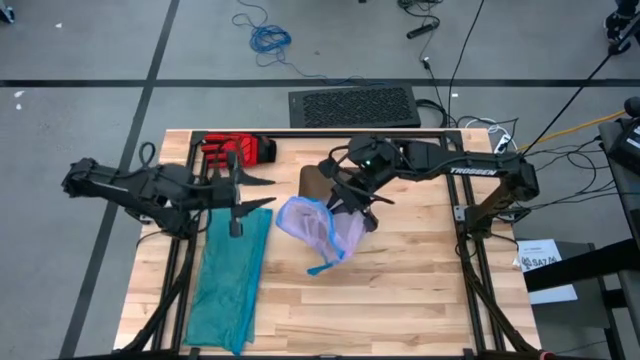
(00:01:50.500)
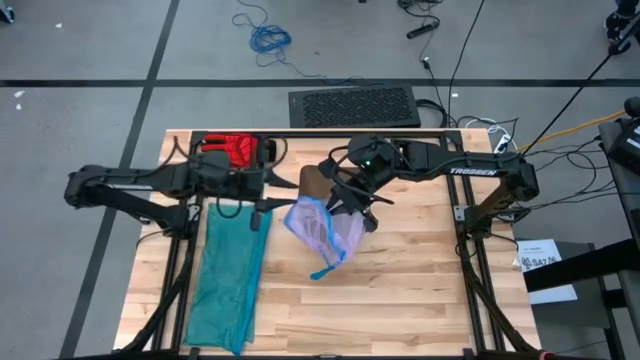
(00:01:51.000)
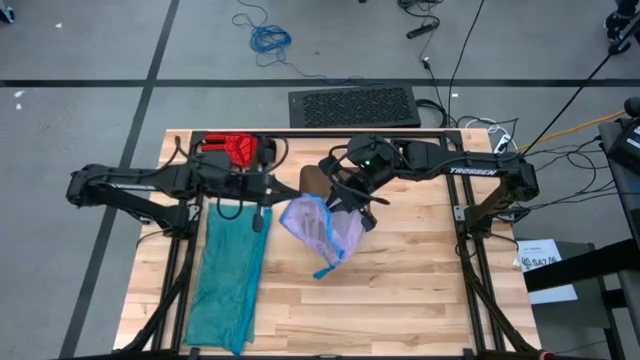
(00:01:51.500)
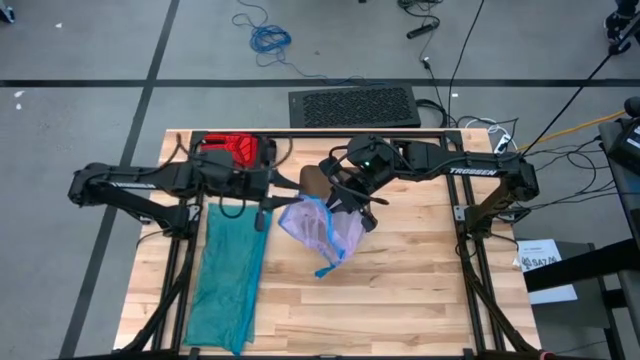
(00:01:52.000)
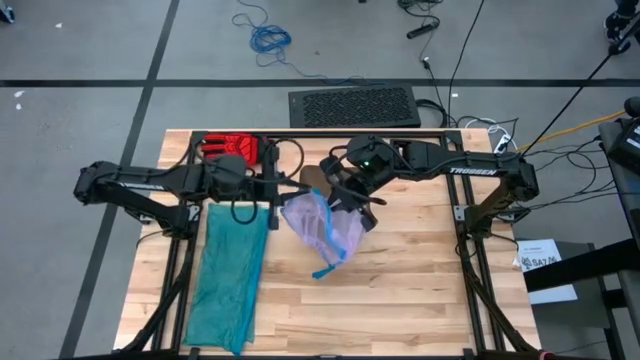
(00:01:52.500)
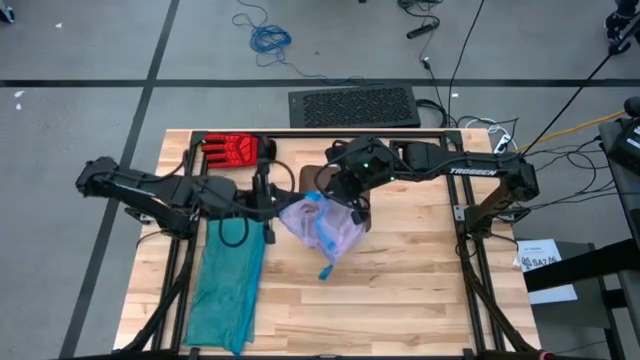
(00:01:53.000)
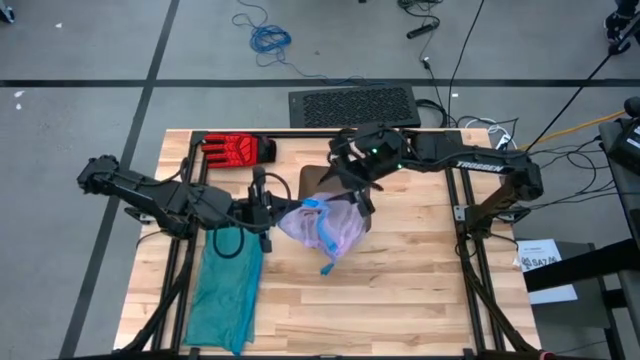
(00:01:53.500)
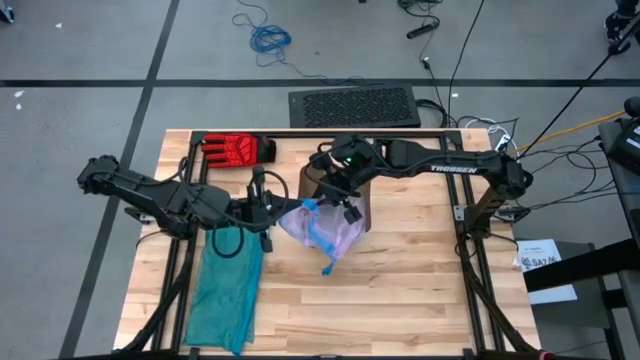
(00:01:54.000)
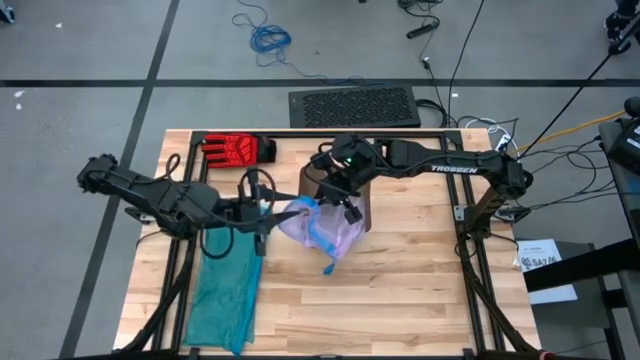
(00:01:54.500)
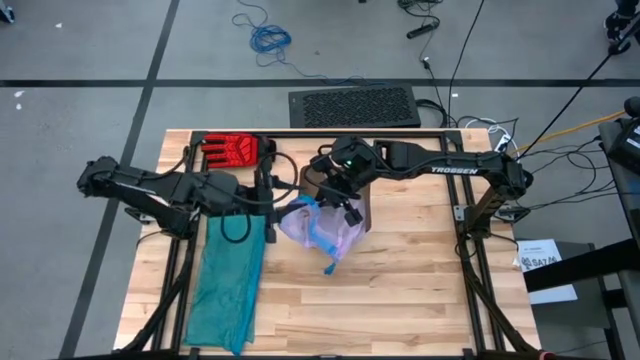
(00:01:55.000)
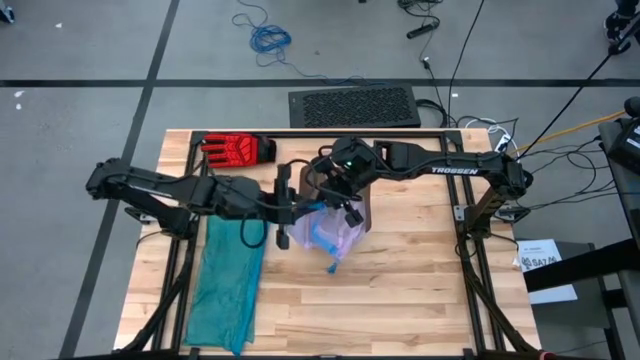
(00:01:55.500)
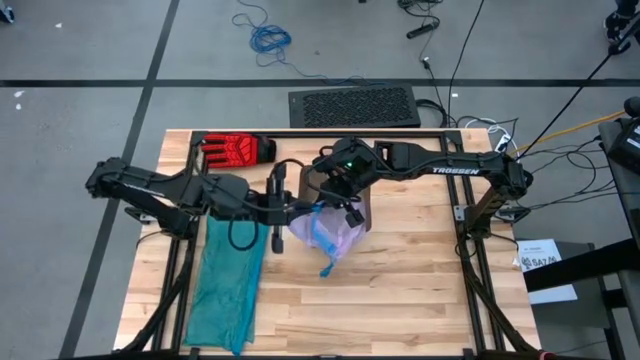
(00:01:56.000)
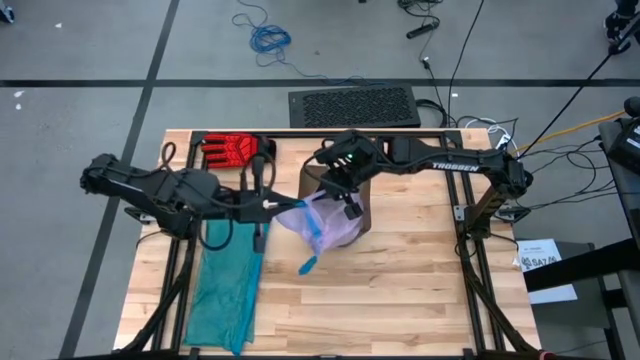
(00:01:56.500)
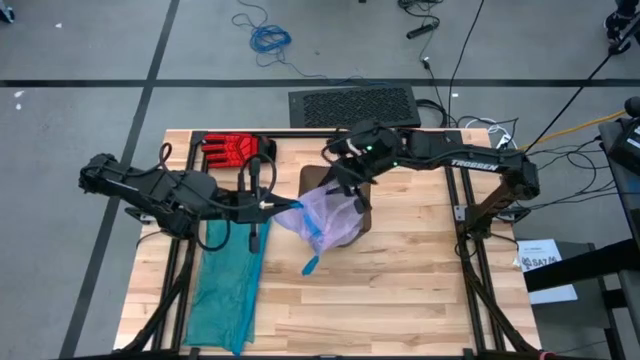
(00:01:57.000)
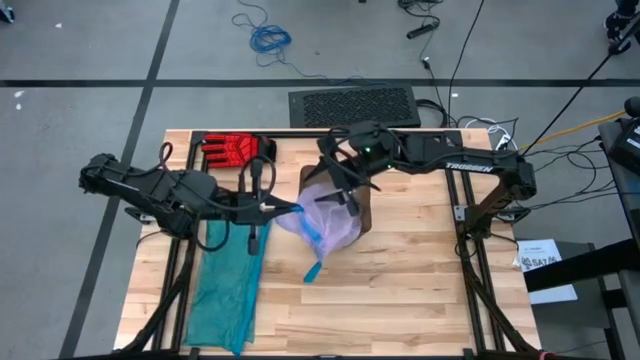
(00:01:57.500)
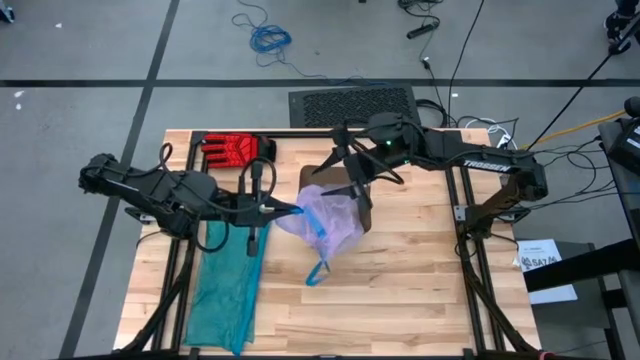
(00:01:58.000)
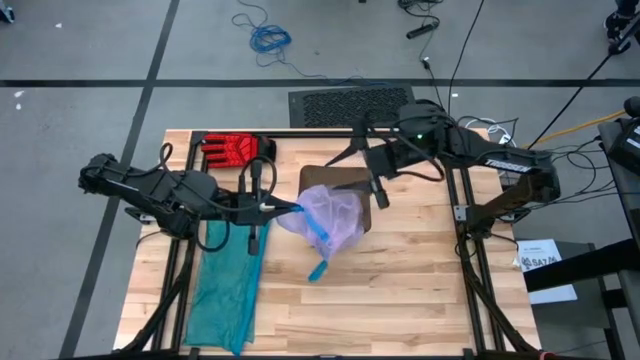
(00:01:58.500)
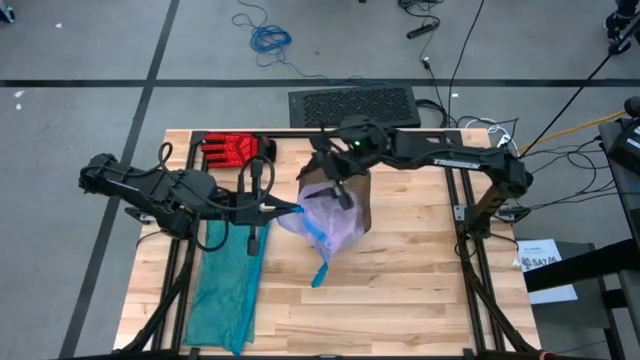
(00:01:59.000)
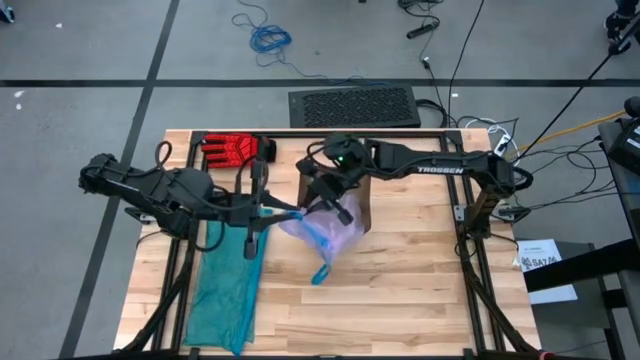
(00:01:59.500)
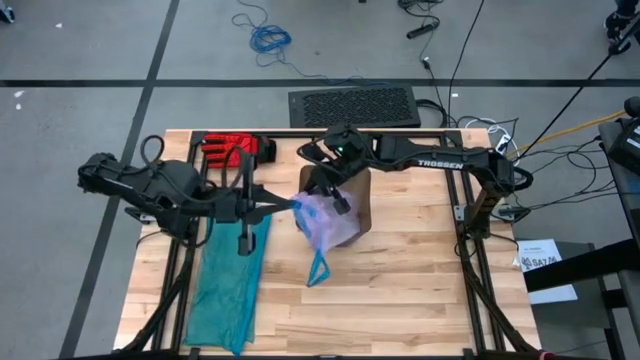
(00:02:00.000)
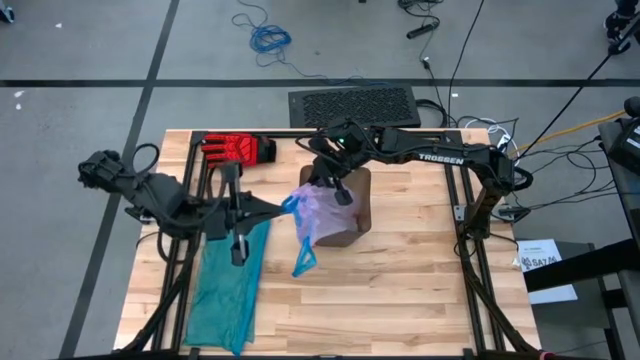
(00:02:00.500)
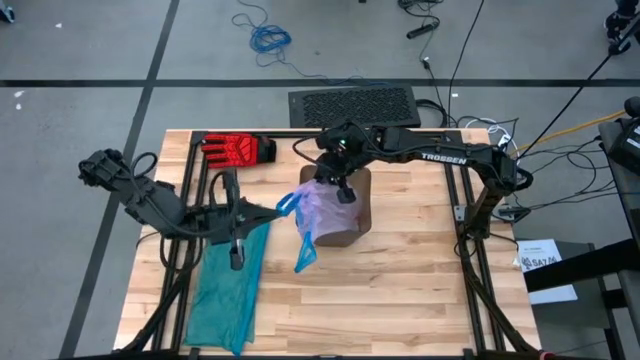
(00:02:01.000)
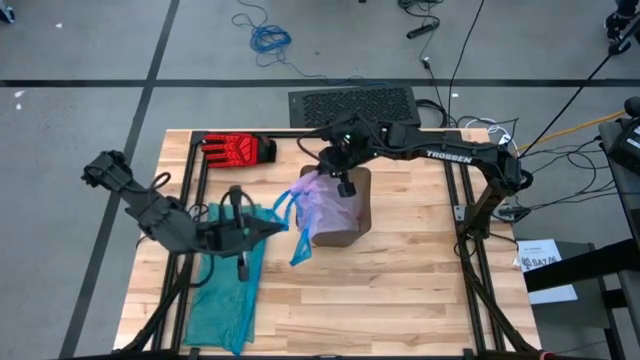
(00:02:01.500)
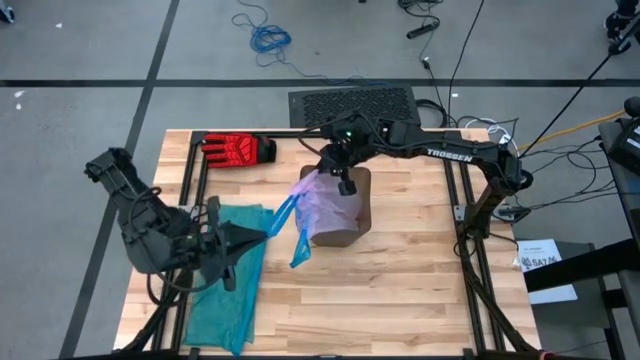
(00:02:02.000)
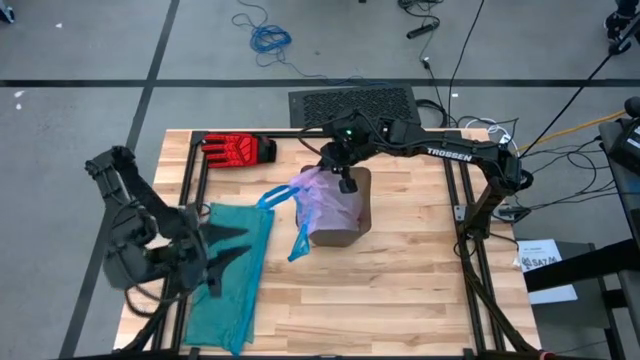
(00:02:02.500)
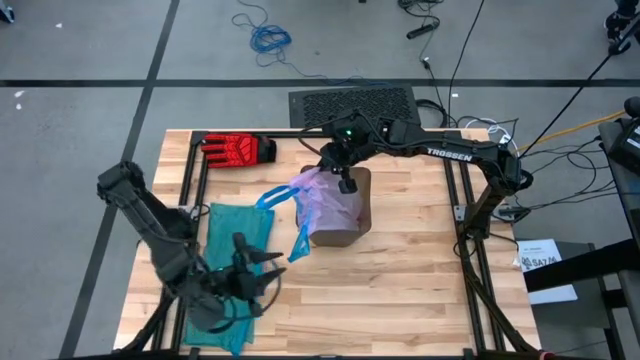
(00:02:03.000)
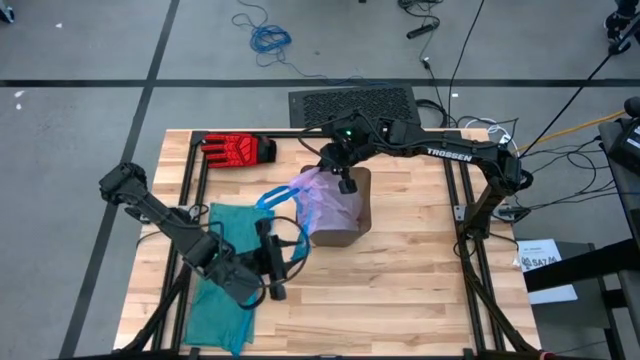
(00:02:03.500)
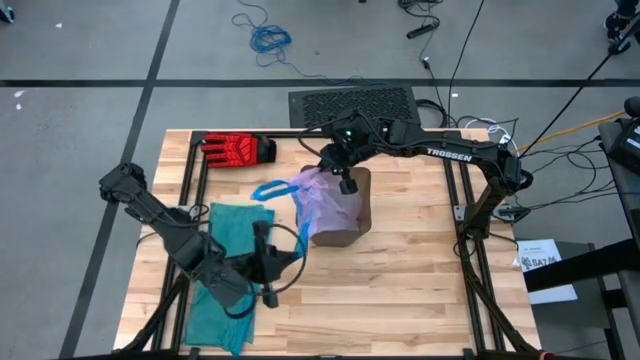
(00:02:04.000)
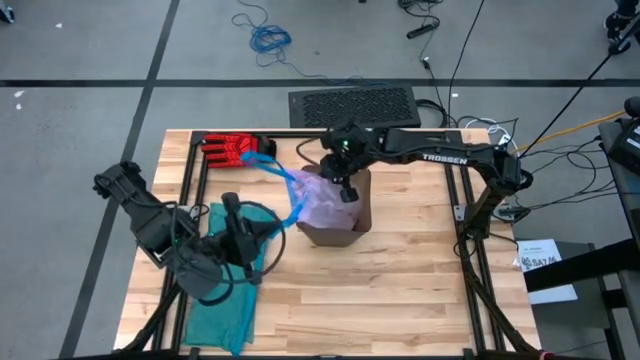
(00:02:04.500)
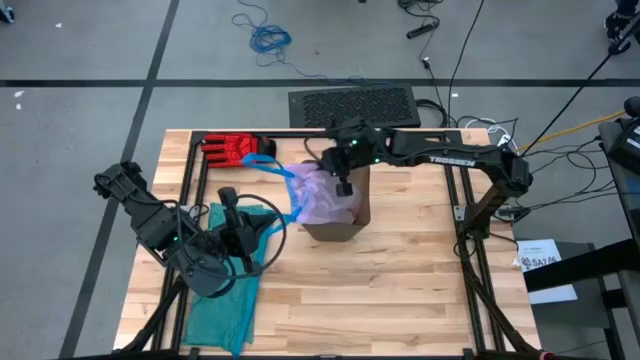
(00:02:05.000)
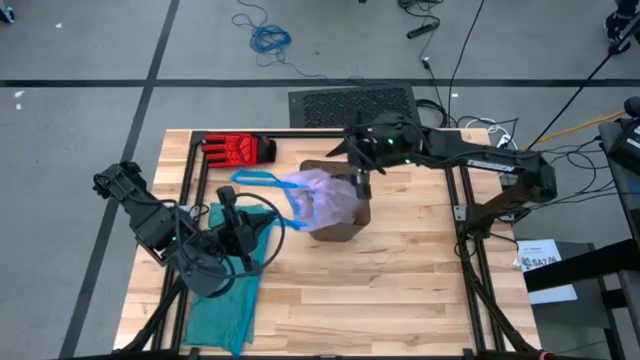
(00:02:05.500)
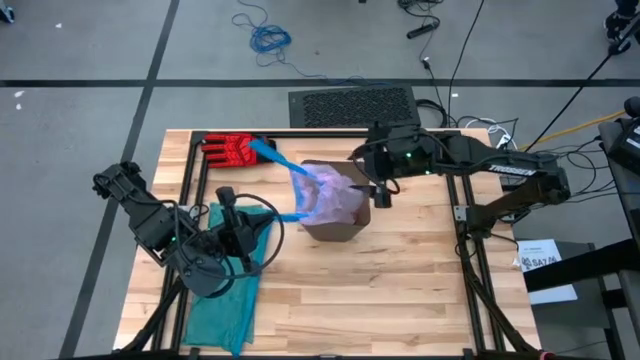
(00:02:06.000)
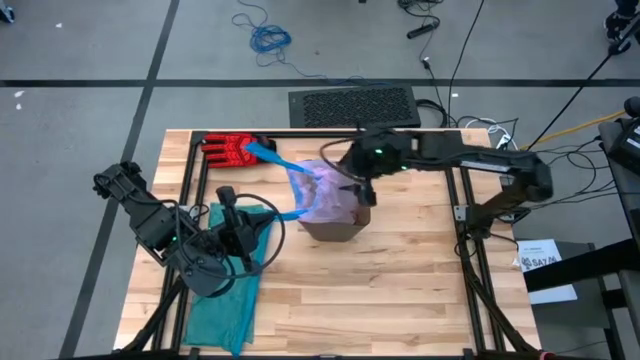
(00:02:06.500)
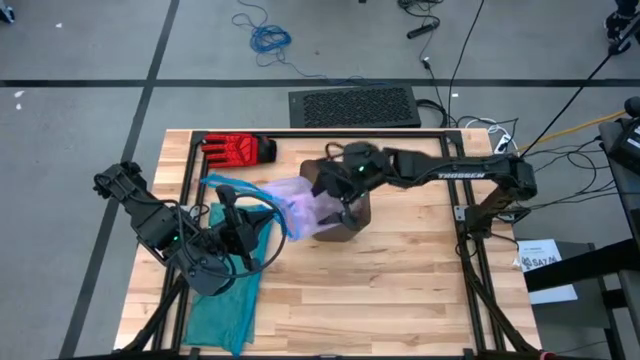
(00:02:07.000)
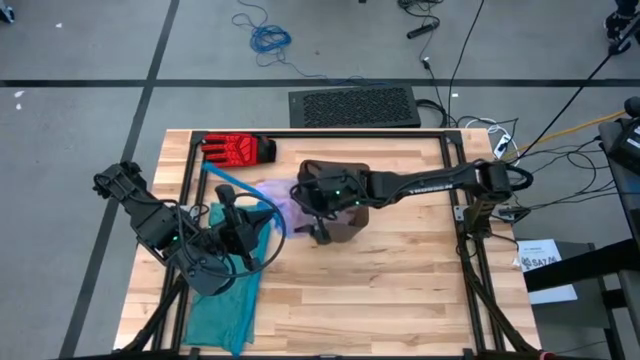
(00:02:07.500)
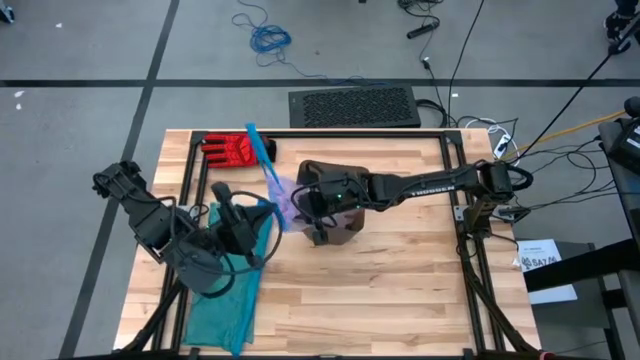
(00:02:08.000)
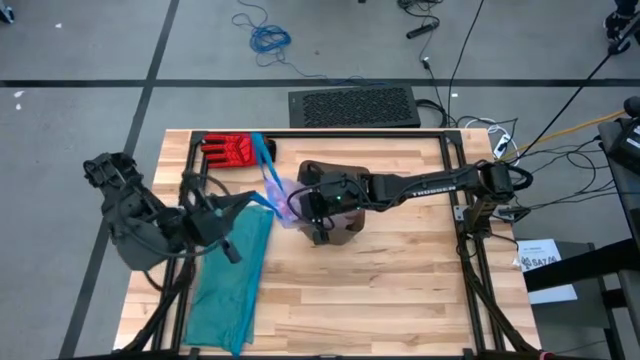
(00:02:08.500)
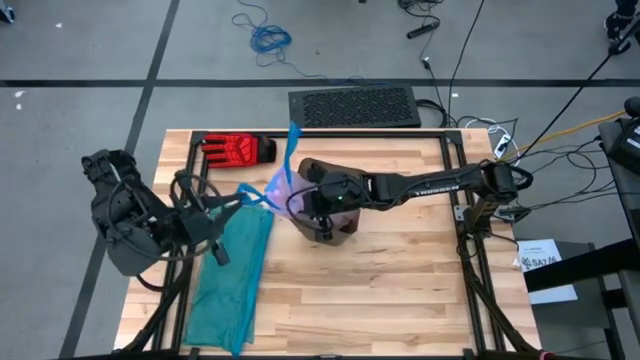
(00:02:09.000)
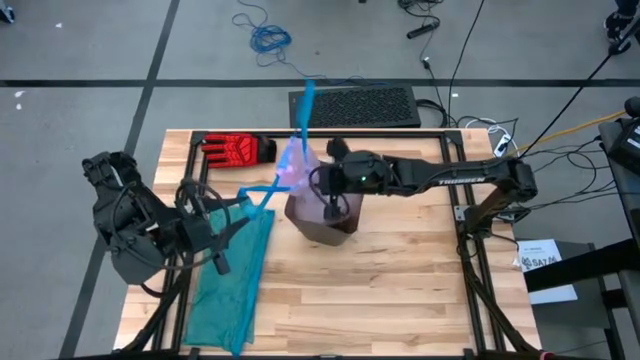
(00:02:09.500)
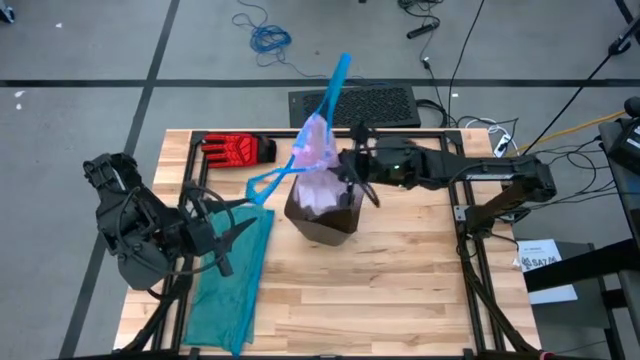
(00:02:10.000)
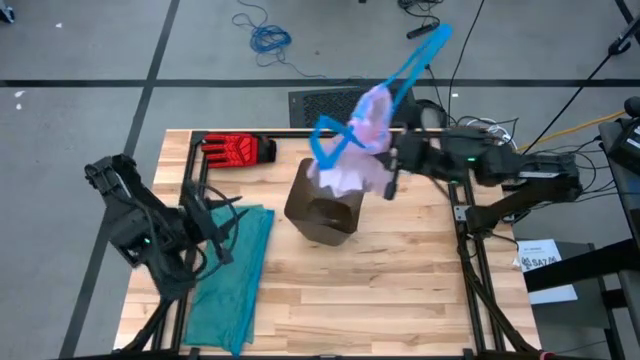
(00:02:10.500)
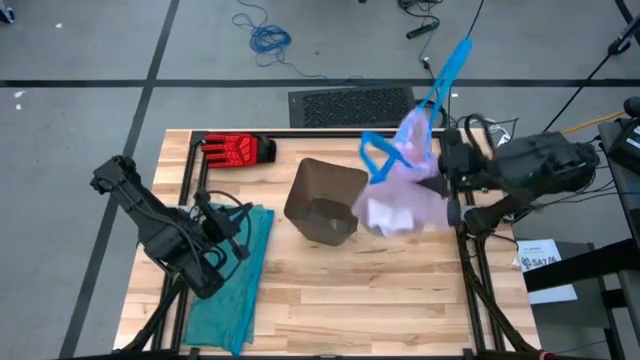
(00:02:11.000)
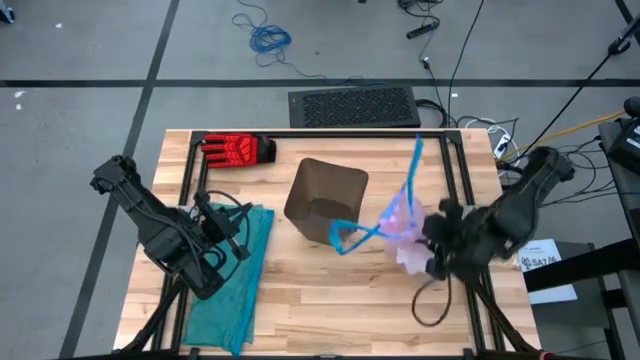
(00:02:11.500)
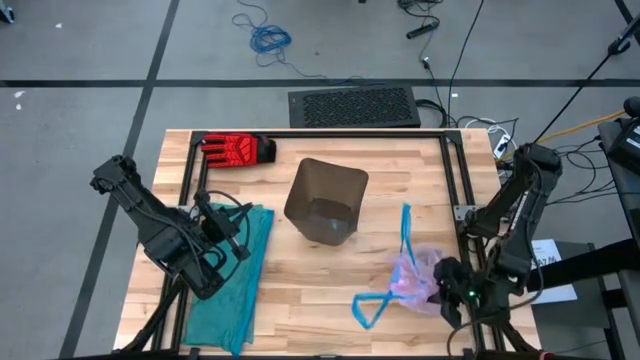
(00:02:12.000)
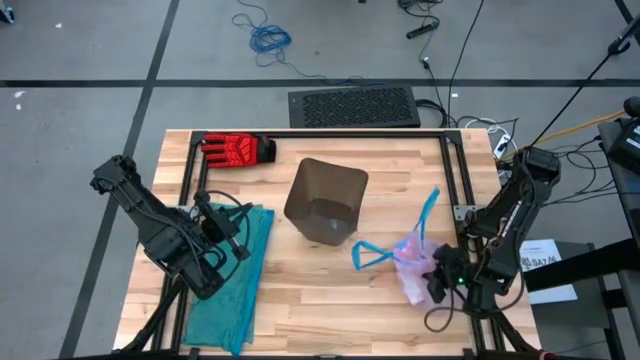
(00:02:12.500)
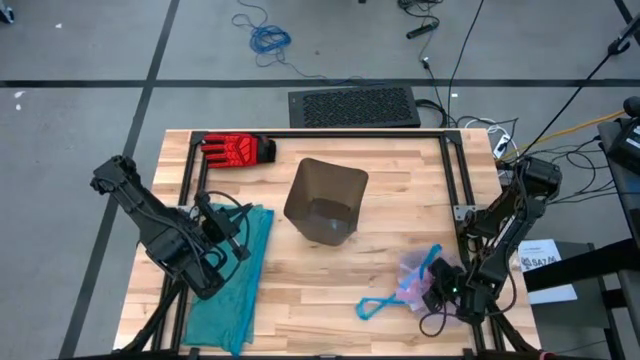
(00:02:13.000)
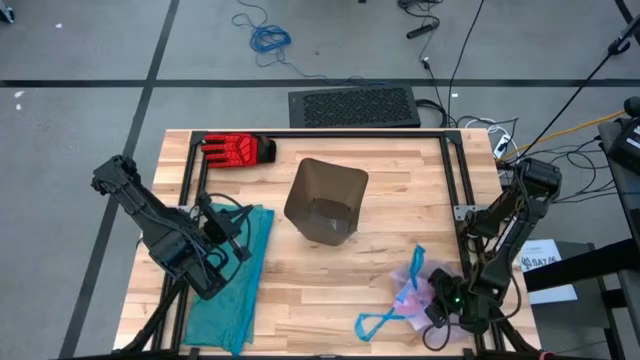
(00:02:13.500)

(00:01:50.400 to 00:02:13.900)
Task: place trash/remove bag and relplace
Remove the pink trash bag from the black trash bin
